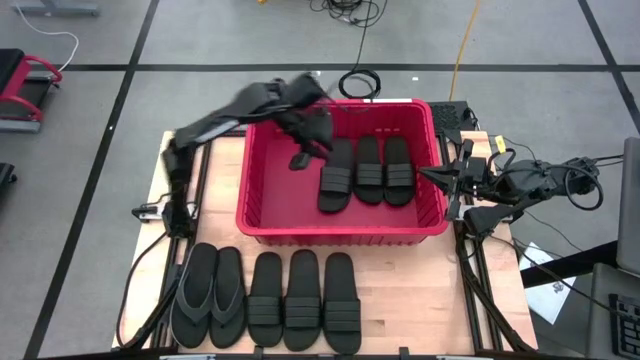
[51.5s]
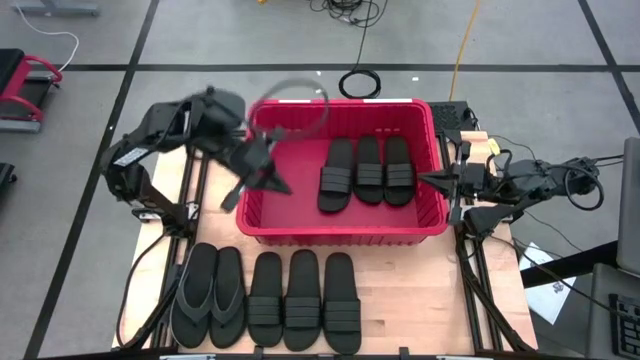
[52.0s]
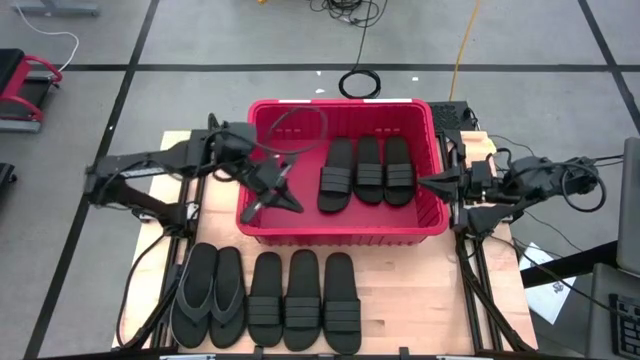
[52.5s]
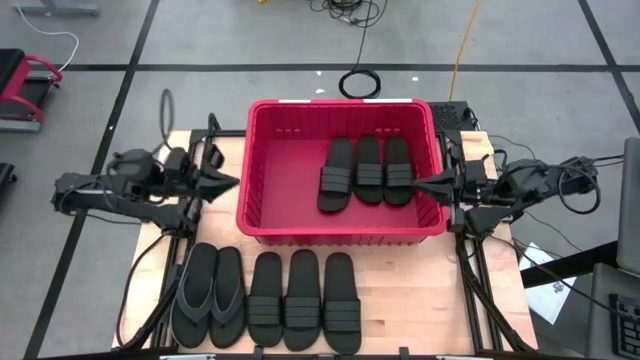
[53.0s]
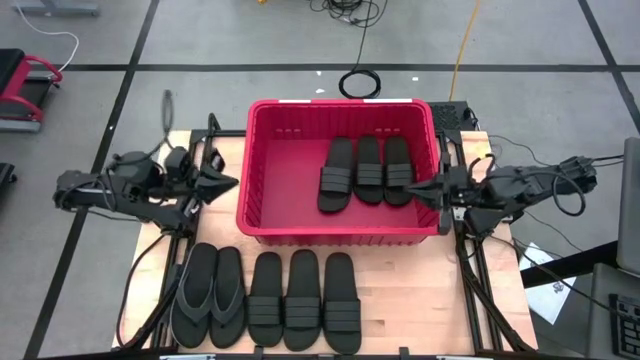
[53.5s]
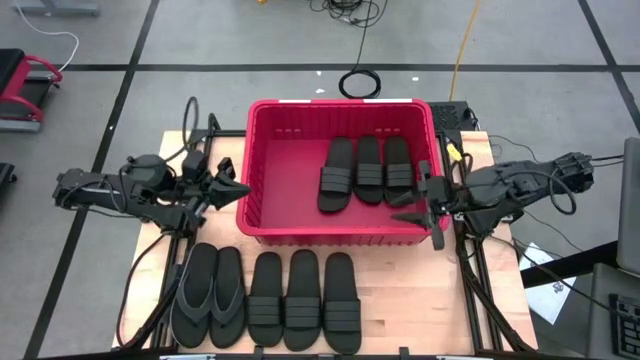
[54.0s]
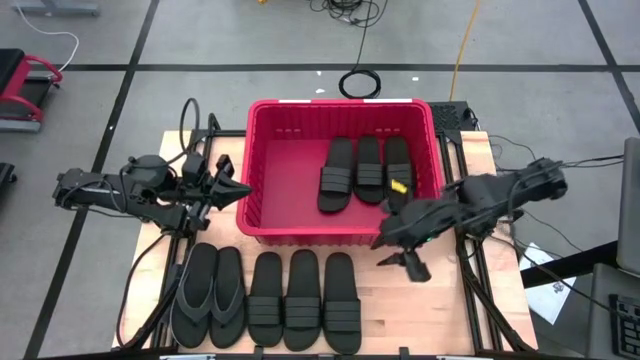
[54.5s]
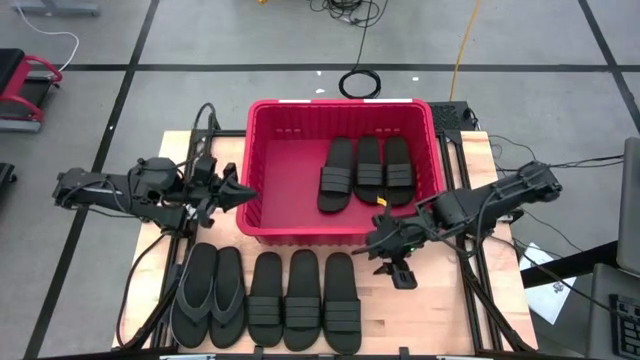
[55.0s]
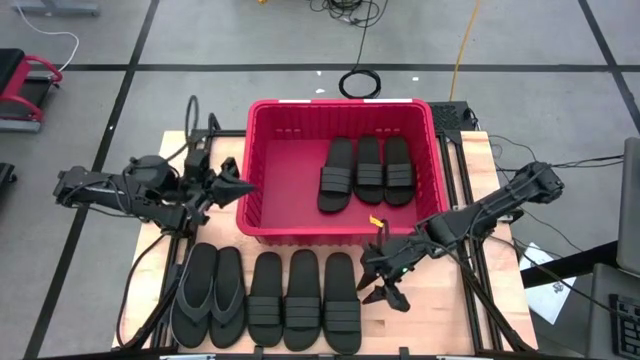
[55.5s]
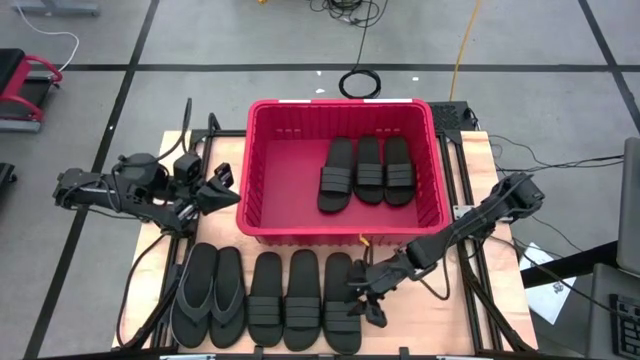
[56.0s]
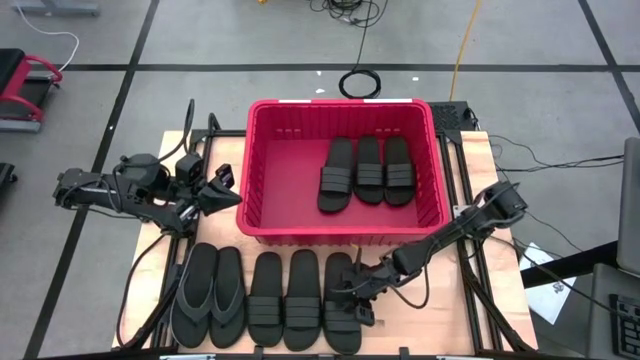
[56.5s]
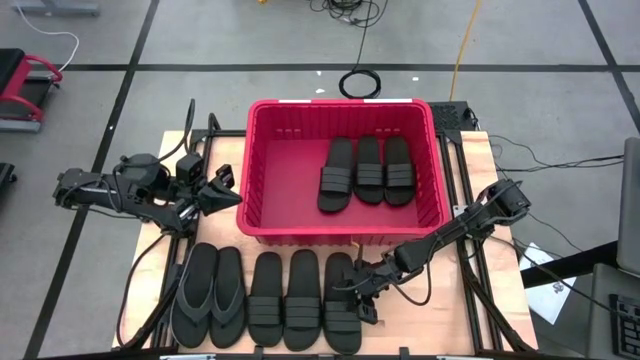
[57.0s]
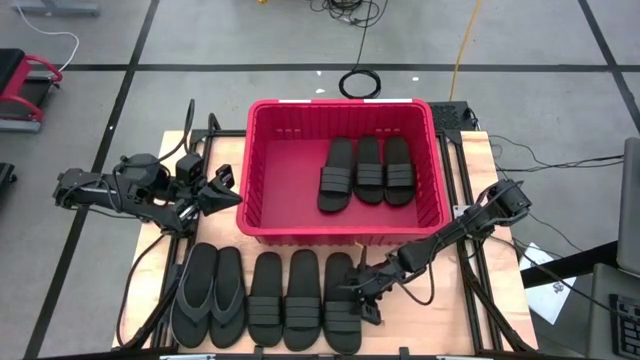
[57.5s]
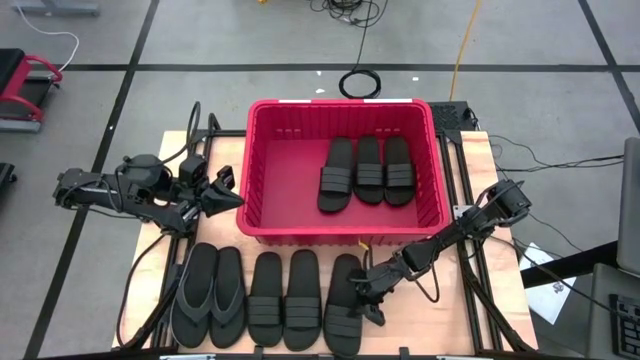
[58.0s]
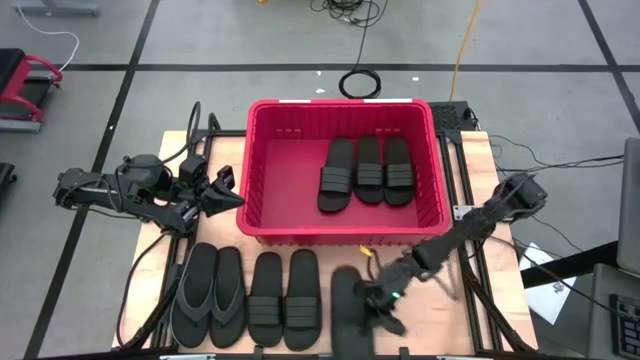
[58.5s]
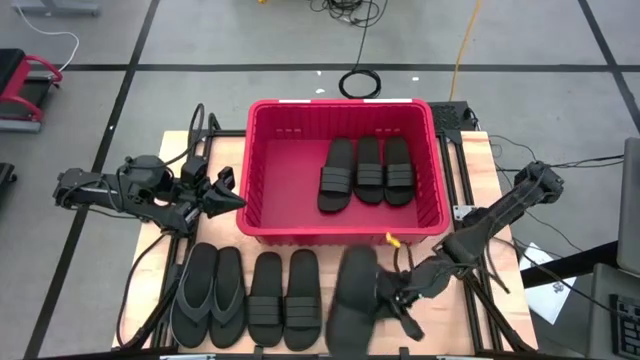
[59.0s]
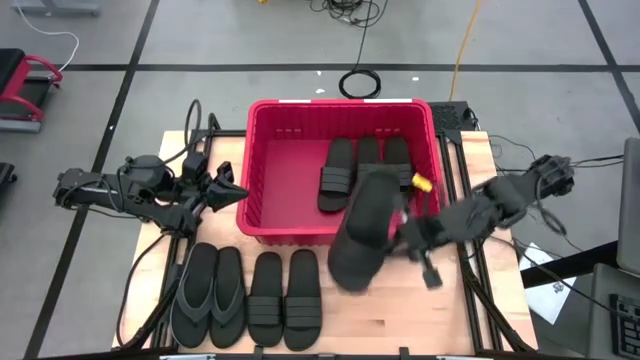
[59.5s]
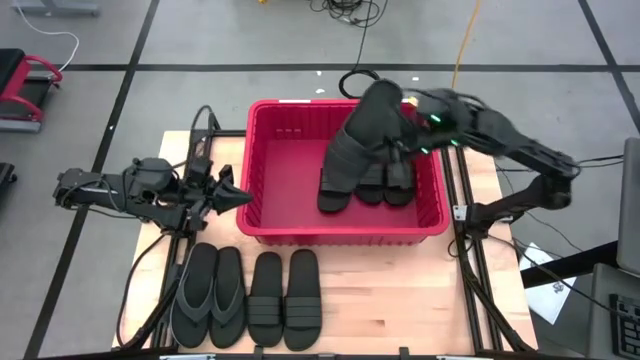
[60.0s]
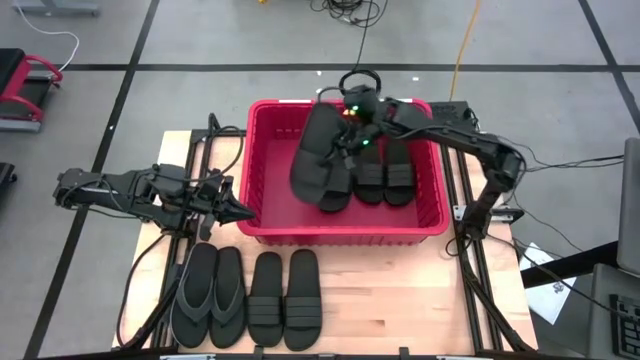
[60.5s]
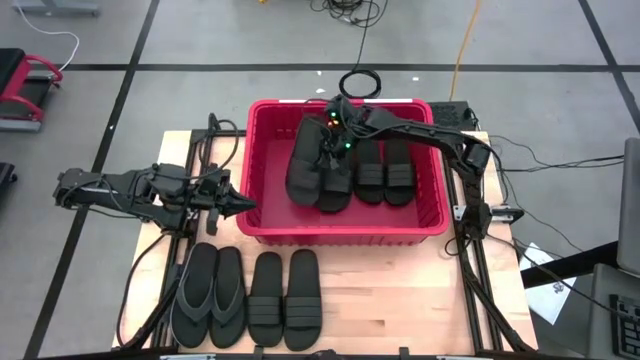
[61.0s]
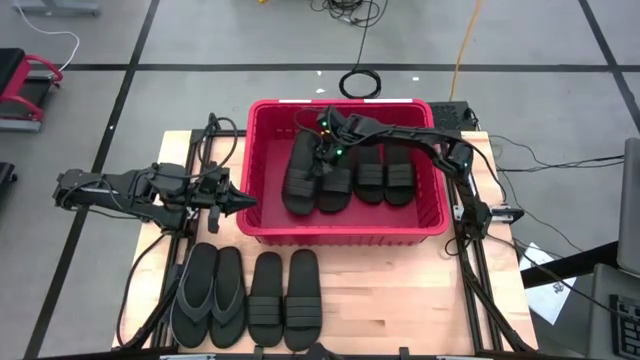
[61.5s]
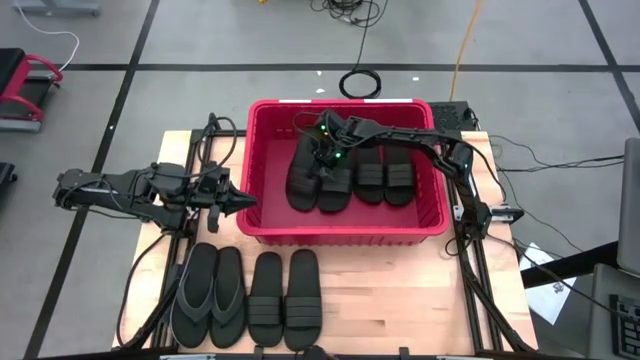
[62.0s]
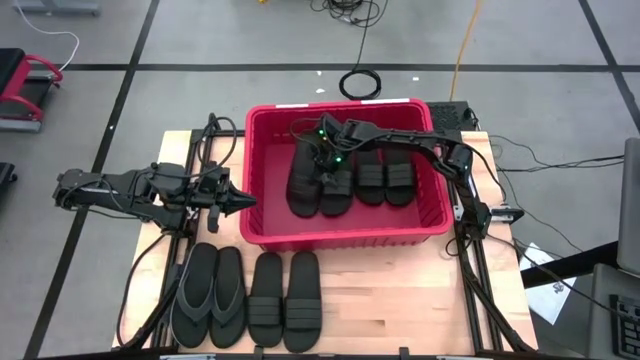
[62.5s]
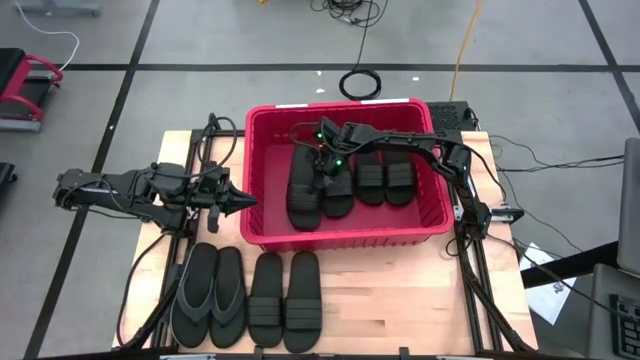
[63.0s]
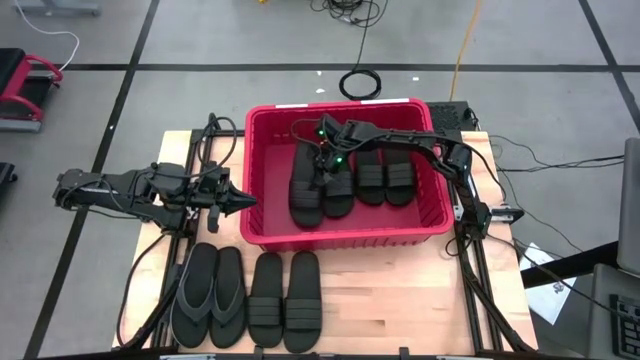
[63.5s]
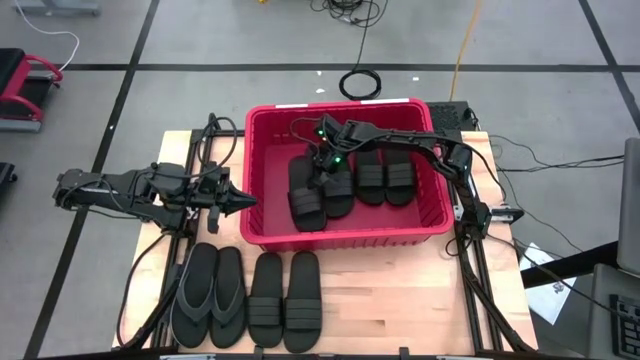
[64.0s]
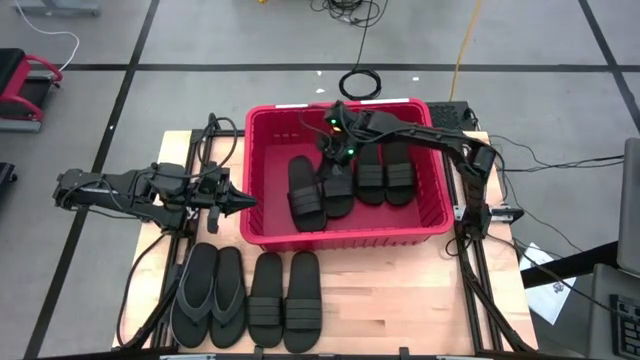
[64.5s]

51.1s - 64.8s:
Task: Pick and place slides into bin
Put the black slide into the red bin

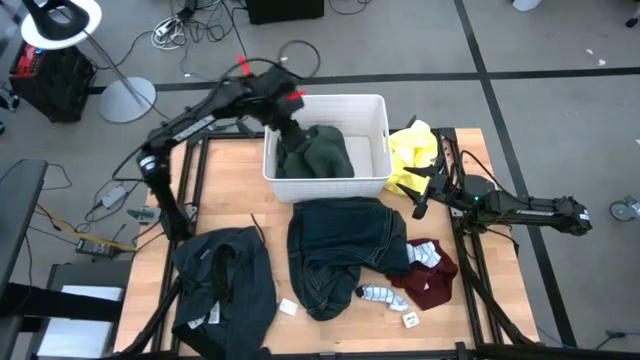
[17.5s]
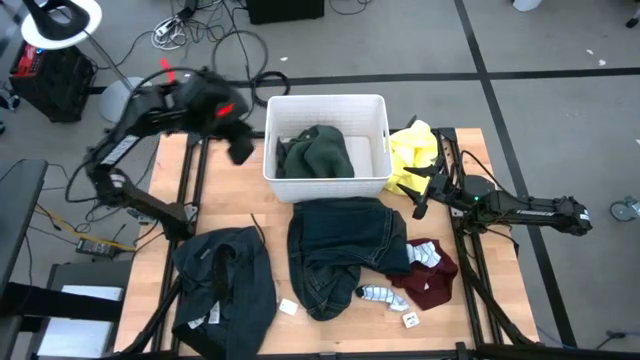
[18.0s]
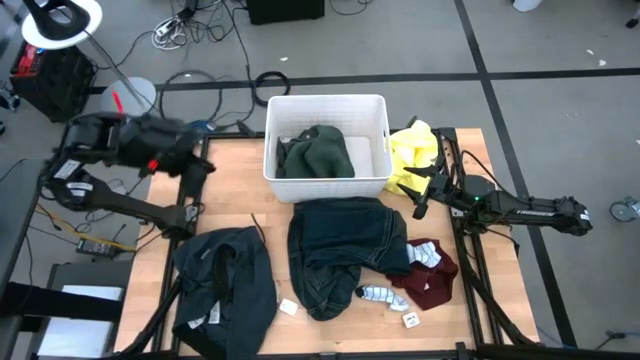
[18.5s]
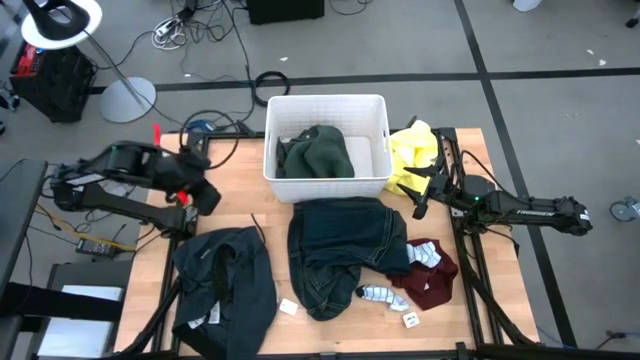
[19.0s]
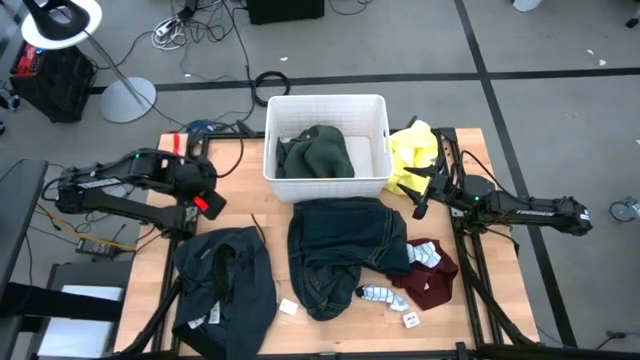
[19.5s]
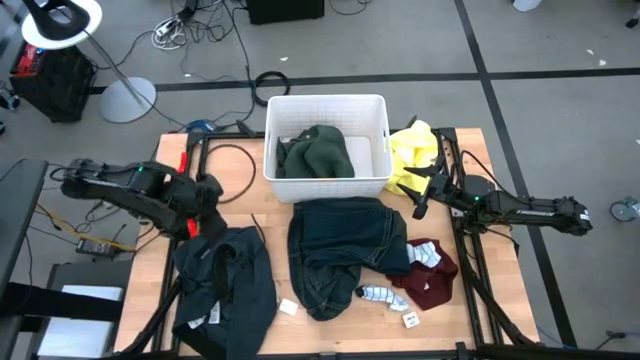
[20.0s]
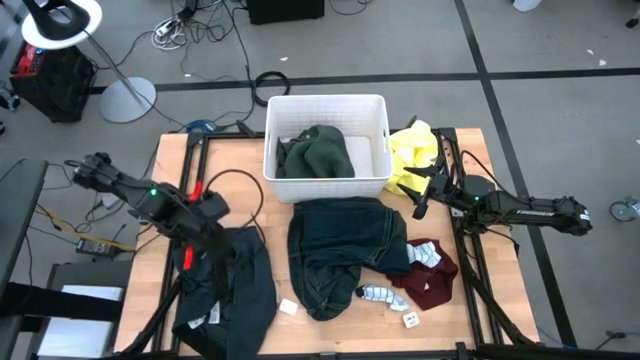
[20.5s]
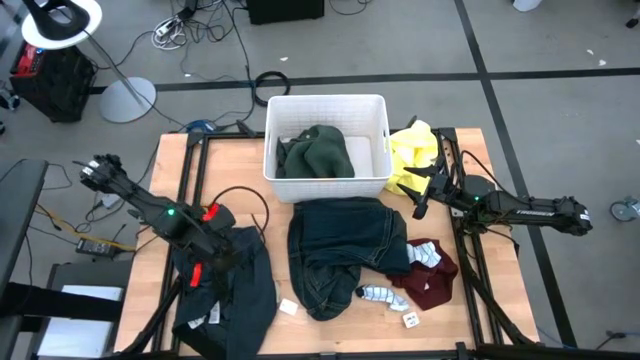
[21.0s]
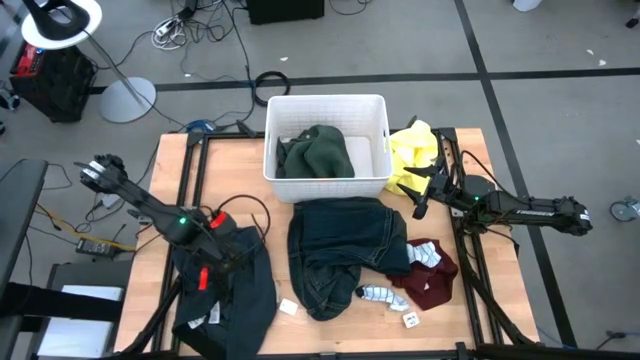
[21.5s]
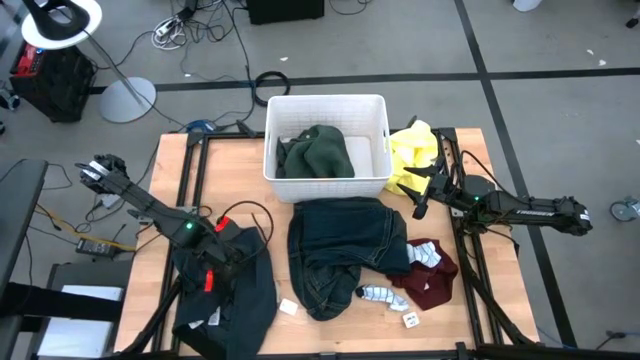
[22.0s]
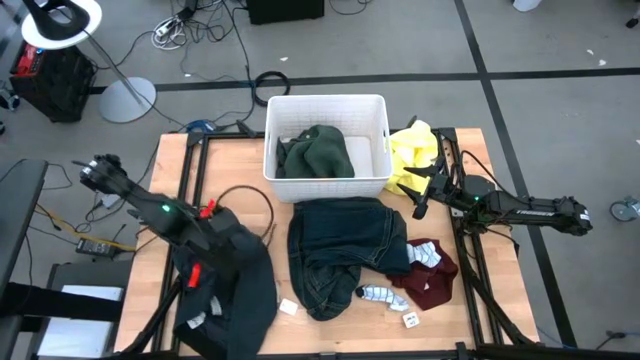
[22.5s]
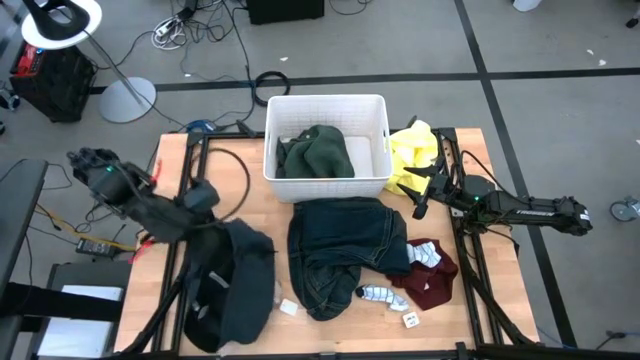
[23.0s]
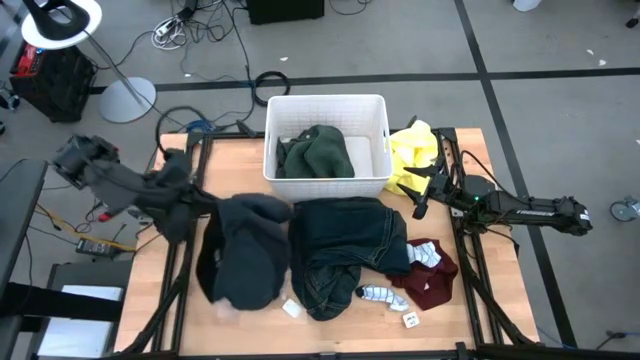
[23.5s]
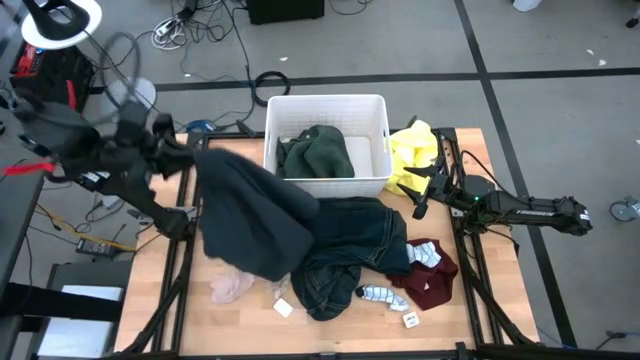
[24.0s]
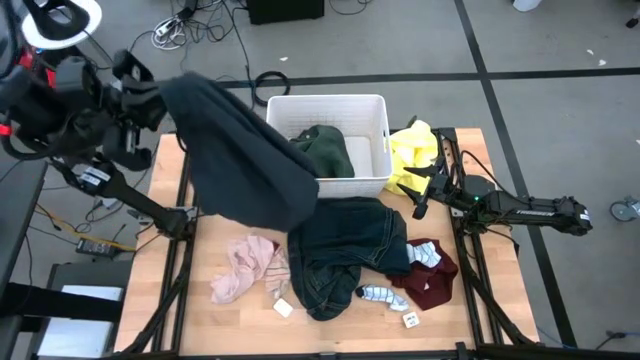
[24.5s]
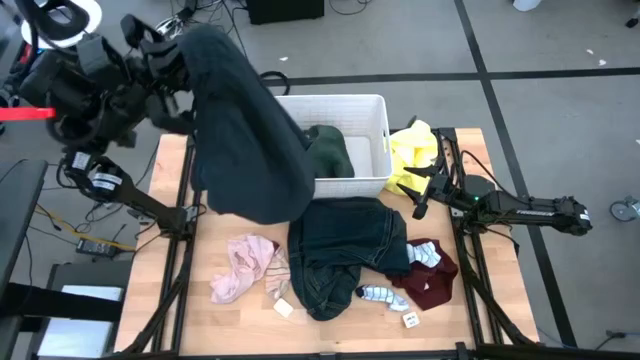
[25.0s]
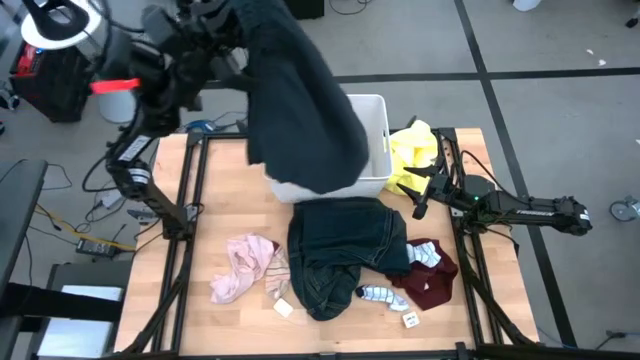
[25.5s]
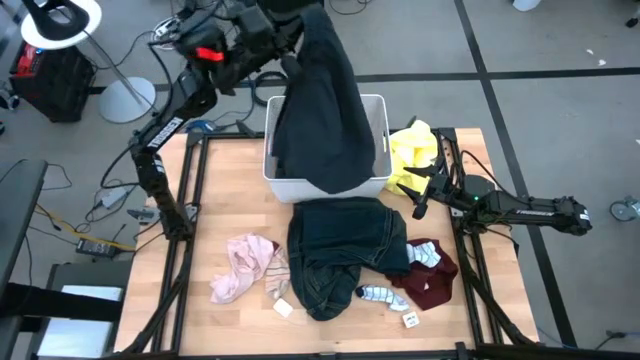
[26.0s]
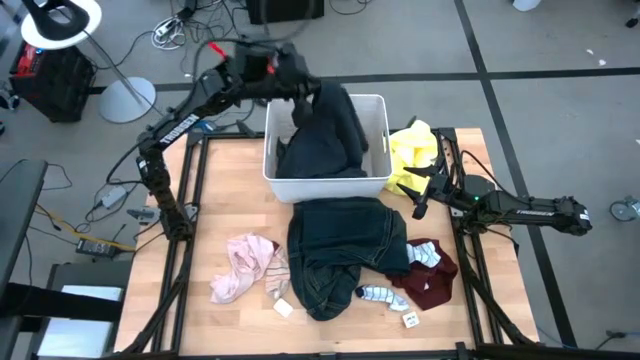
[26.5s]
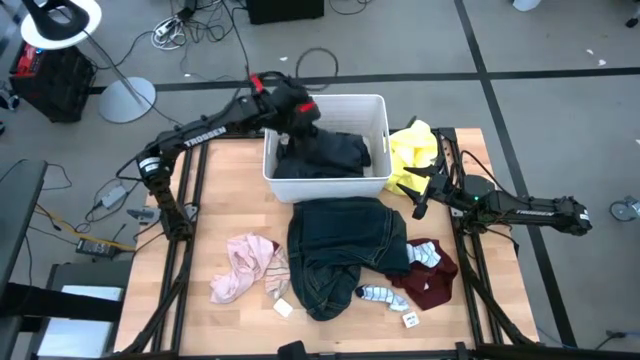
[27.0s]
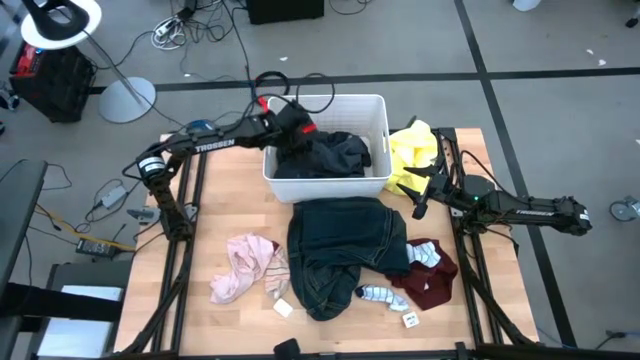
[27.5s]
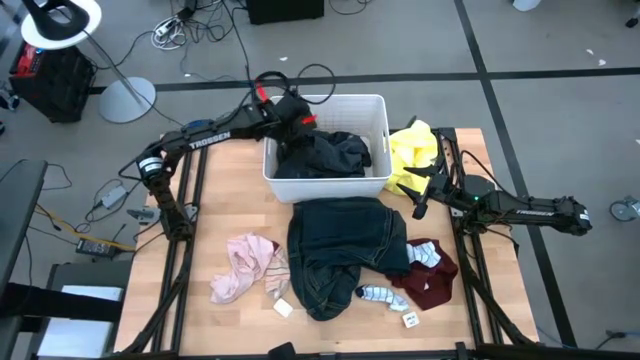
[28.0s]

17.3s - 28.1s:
Task: Sort clothes
Put the black shorts into the white laundry bin
